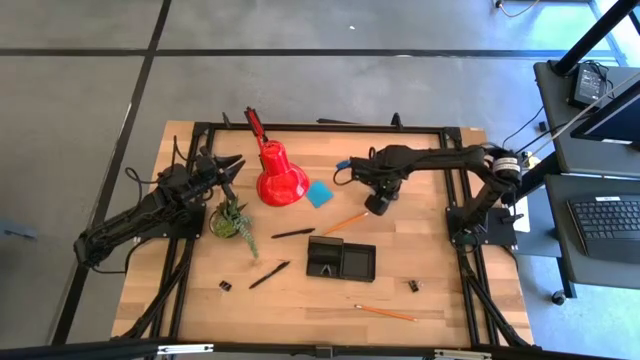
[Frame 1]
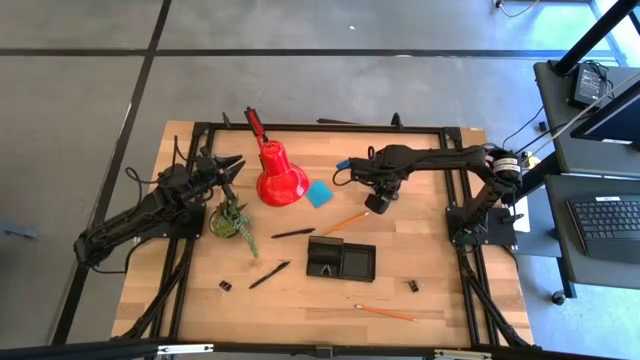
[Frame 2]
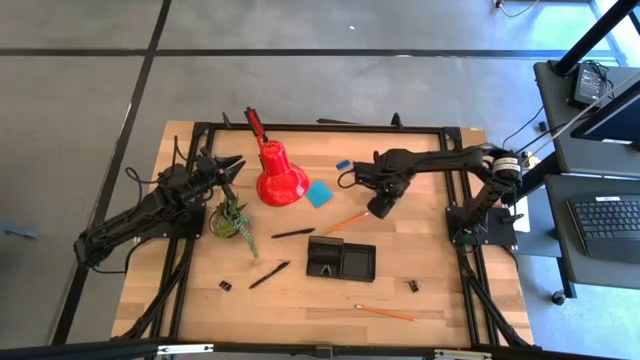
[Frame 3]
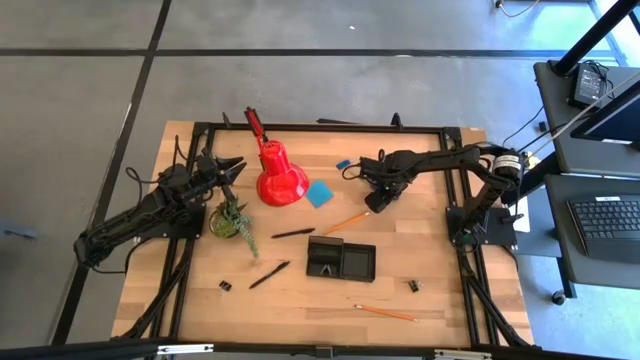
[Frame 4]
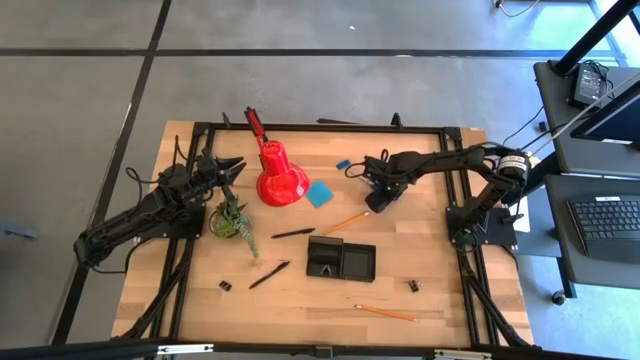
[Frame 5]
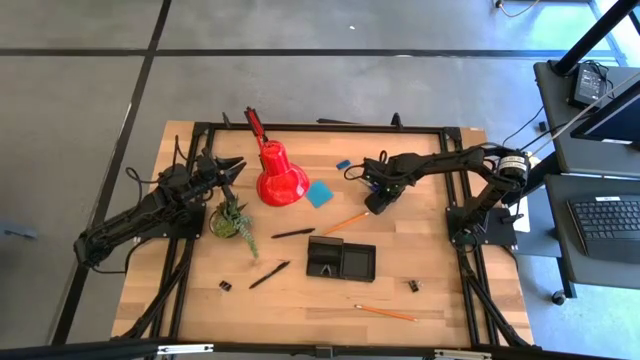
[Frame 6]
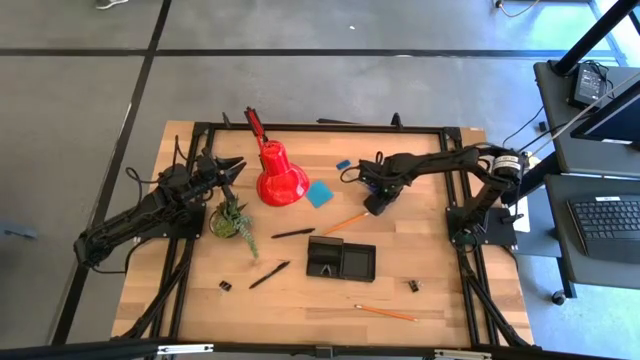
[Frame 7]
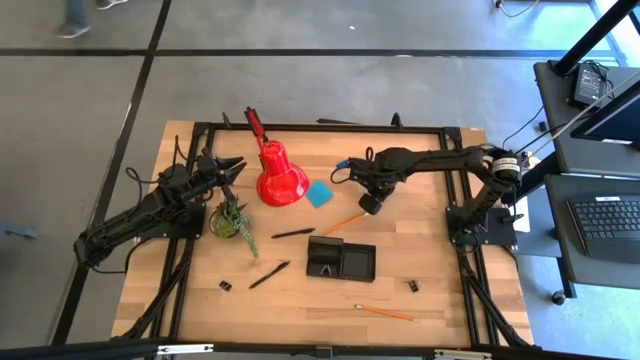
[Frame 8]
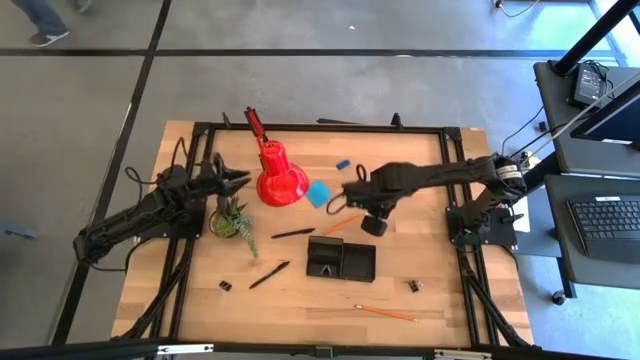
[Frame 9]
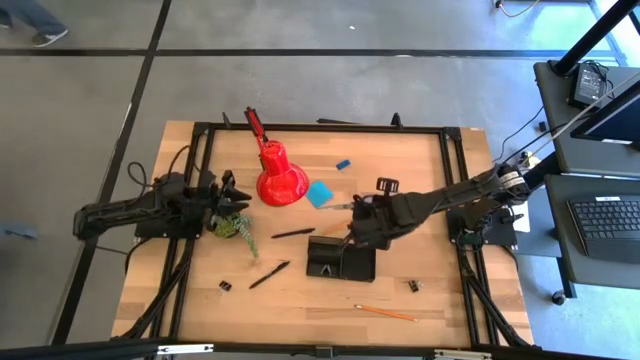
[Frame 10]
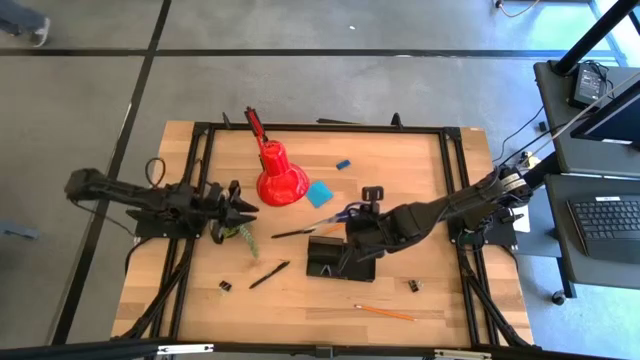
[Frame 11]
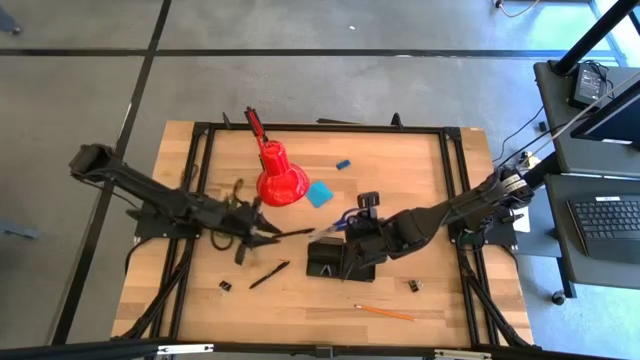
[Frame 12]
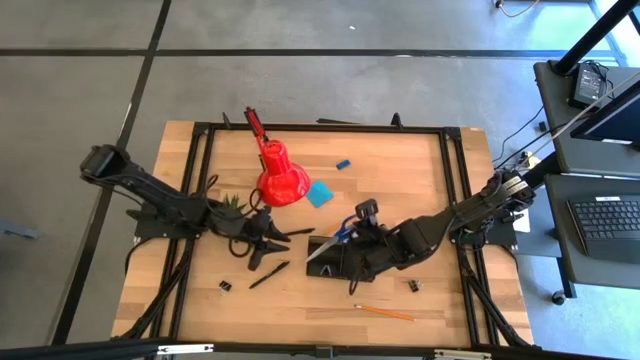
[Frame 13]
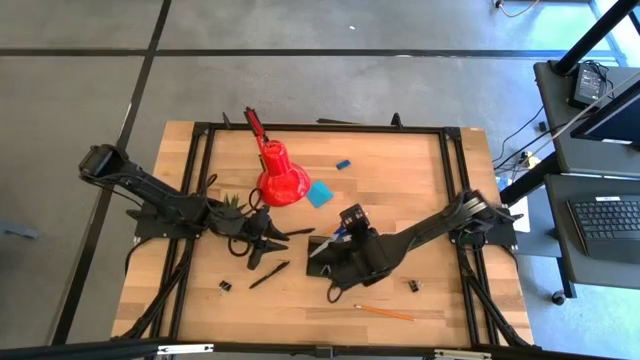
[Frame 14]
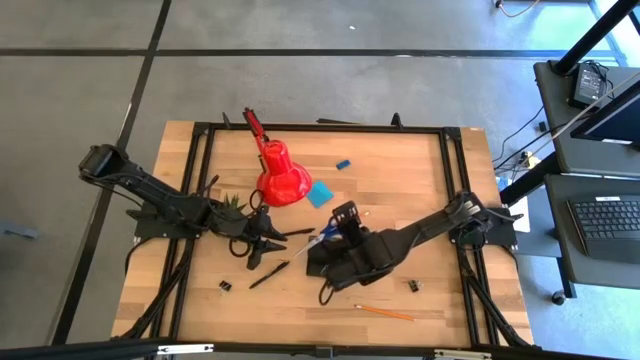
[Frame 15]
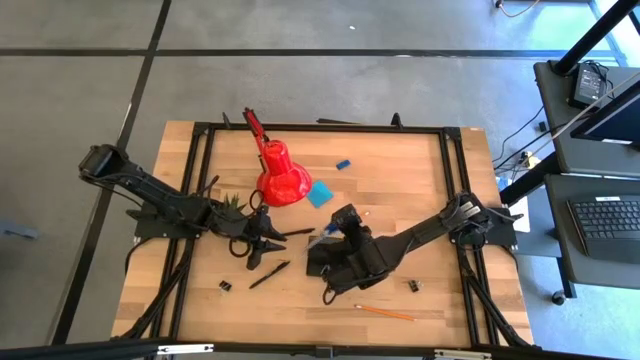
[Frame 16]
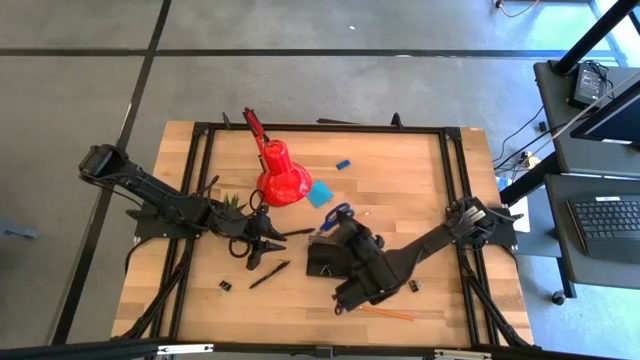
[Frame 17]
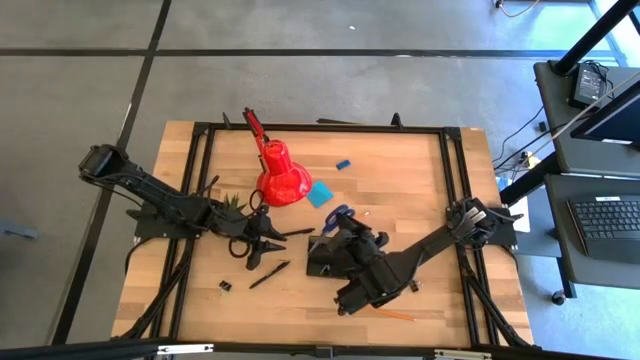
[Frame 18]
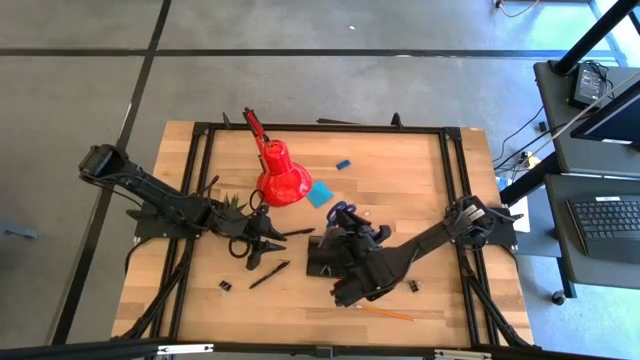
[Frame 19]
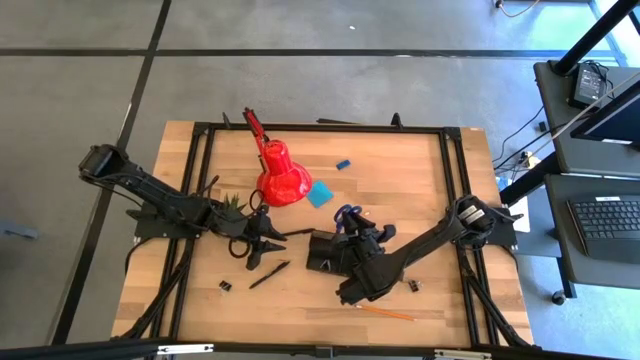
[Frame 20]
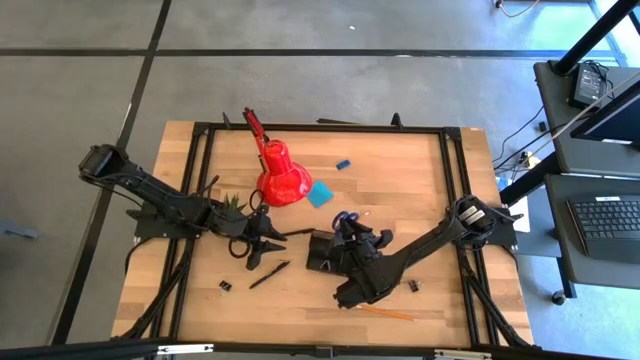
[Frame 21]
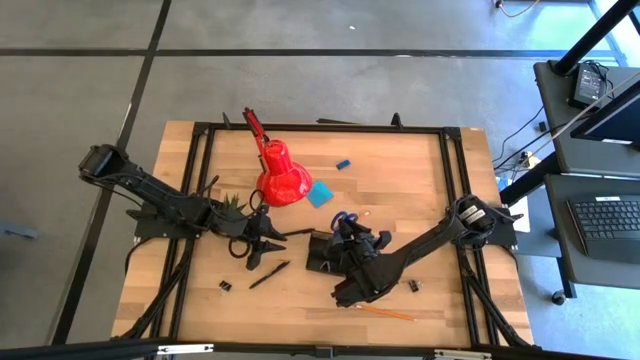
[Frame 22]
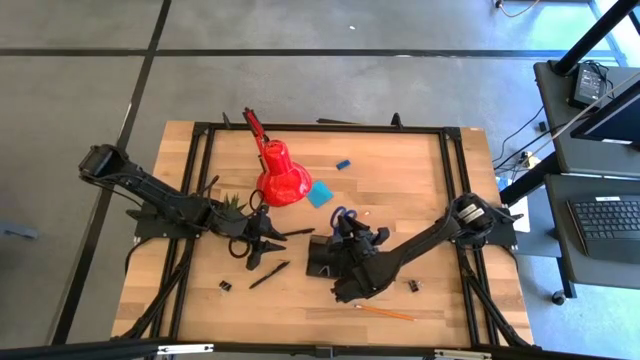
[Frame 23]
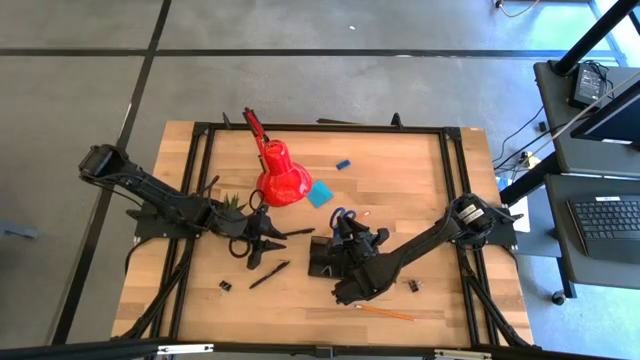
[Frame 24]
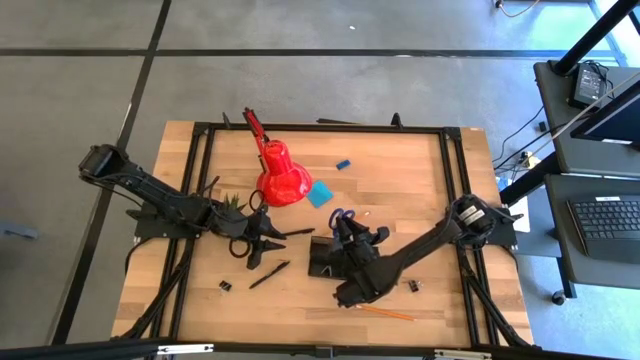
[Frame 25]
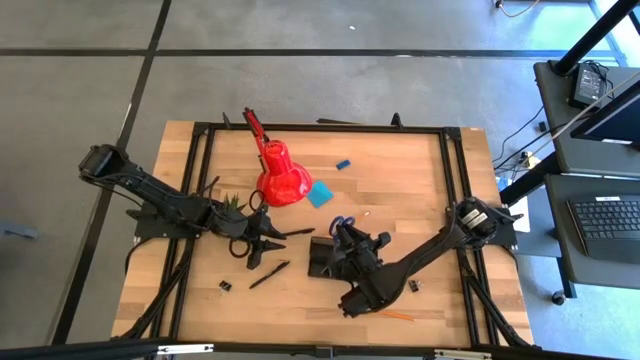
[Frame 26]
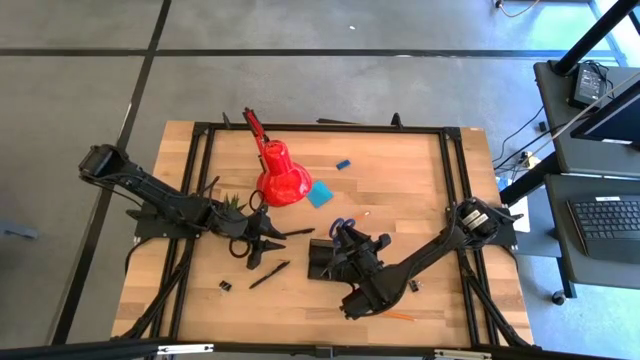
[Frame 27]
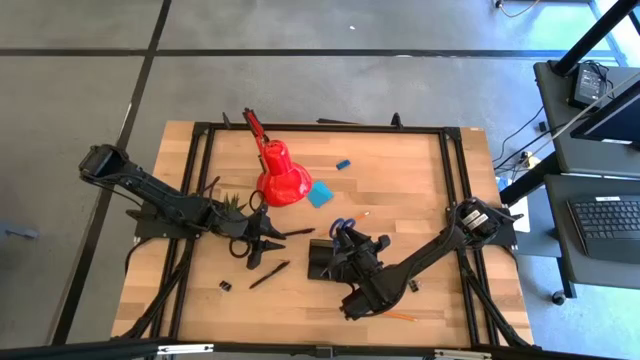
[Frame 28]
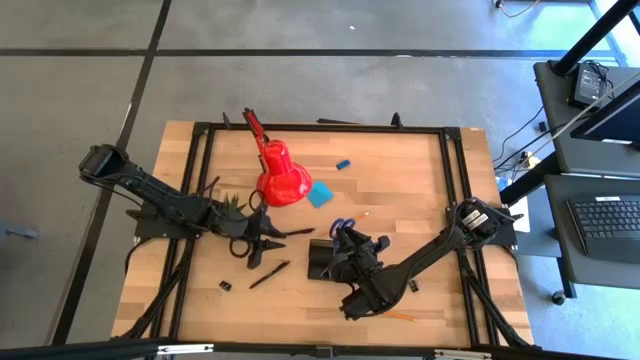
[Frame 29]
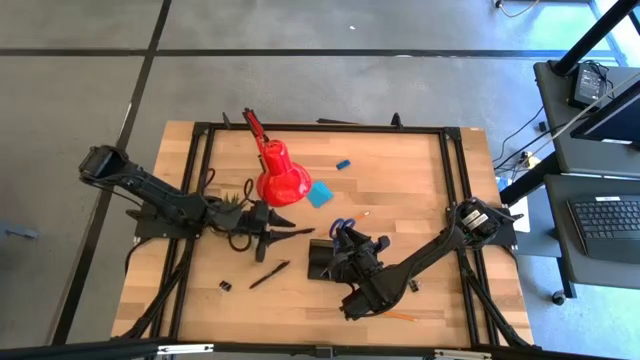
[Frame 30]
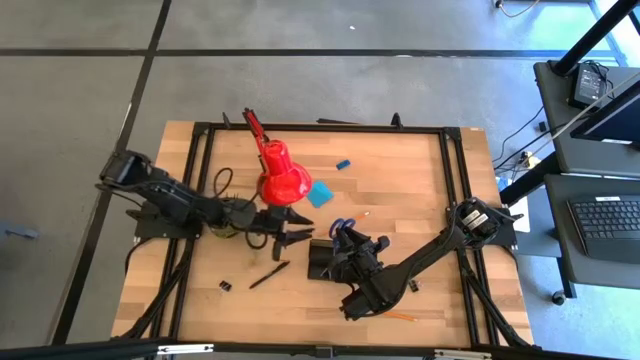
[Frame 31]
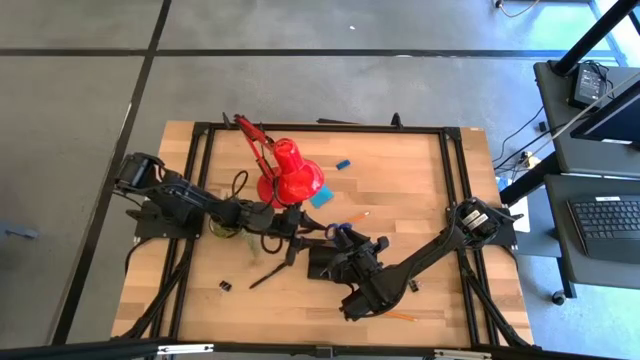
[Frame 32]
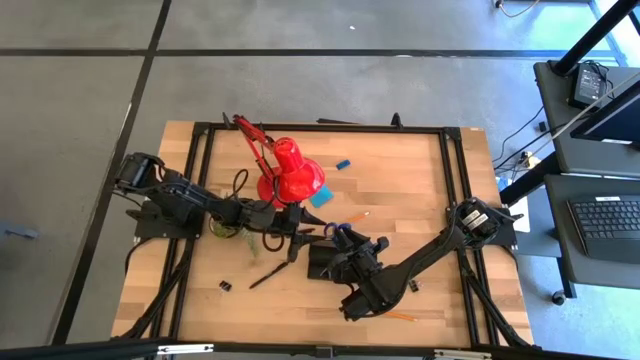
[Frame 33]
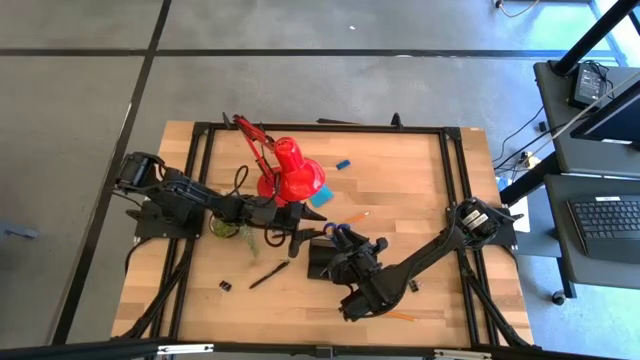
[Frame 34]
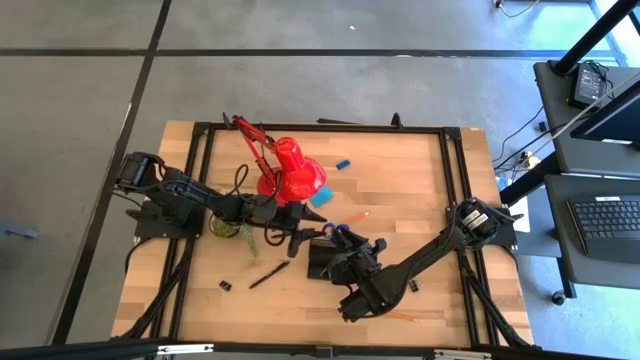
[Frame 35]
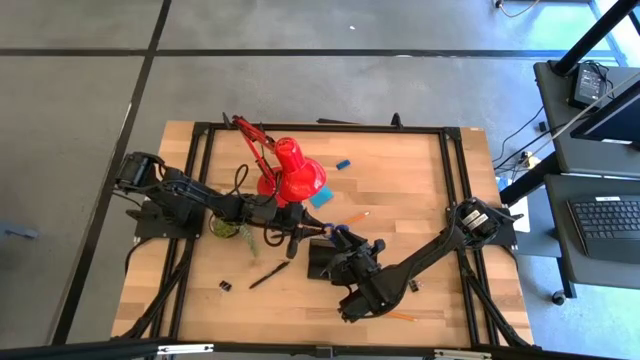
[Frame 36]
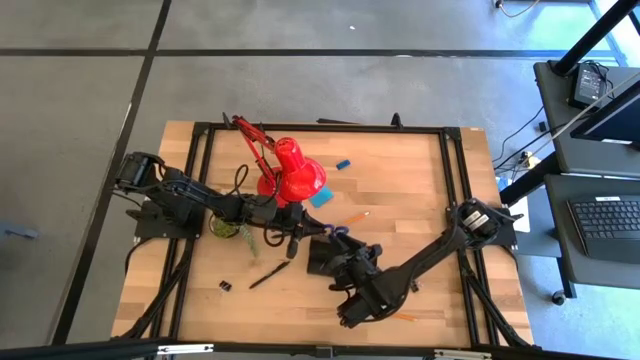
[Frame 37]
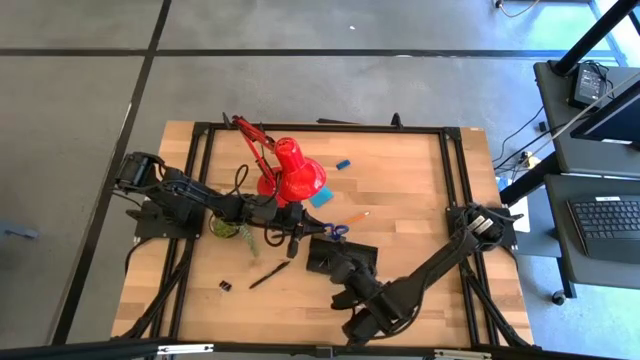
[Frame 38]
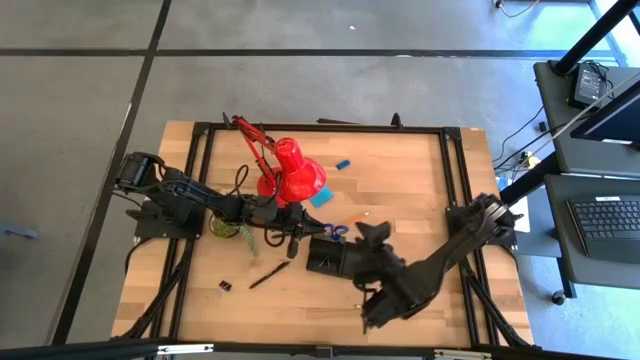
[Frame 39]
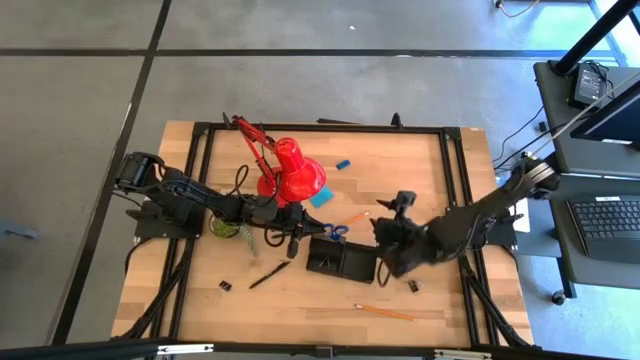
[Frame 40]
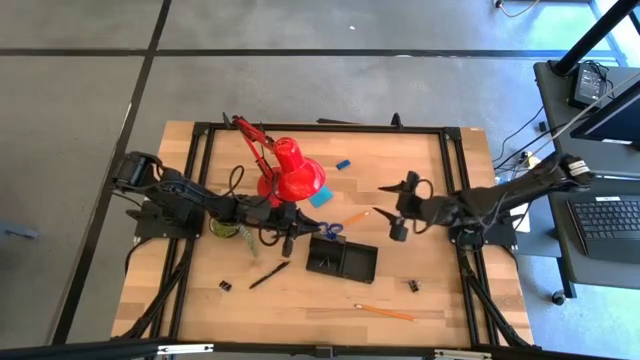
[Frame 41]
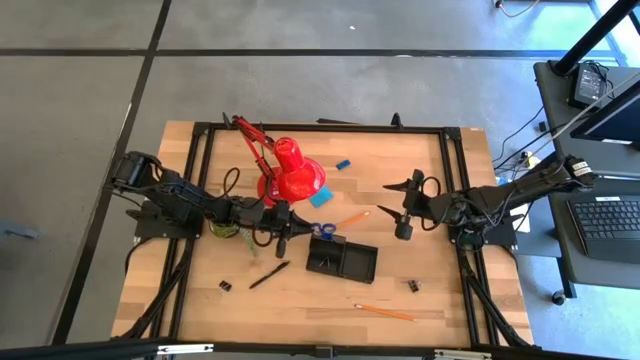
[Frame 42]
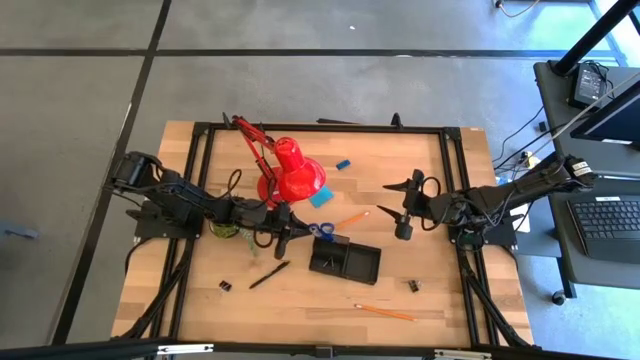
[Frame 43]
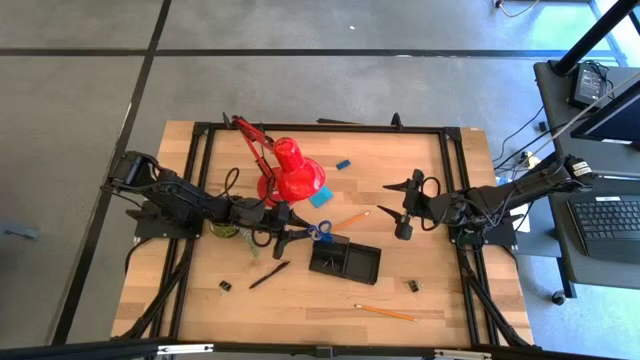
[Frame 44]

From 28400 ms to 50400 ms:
Task: Pick and place office supplies into organizer
Put the blue scissors into the desk organizer
